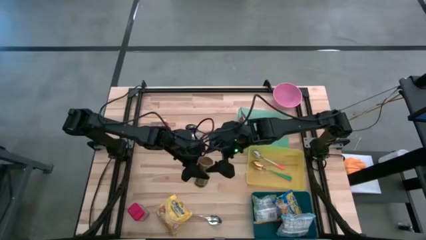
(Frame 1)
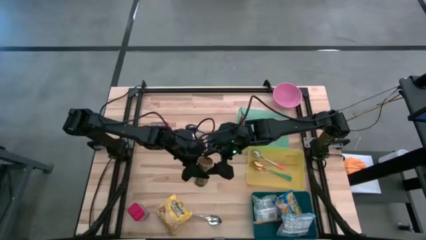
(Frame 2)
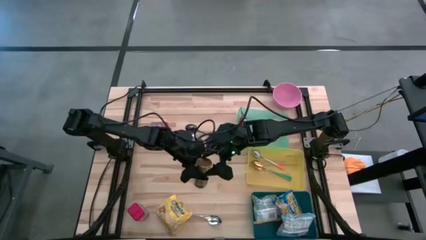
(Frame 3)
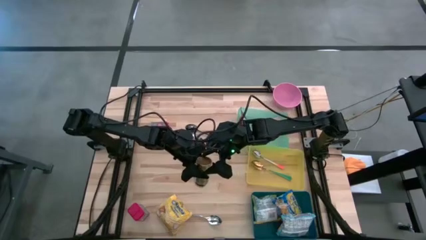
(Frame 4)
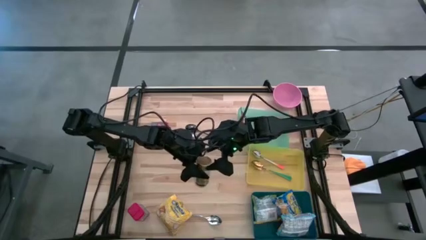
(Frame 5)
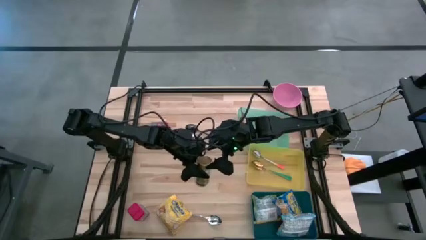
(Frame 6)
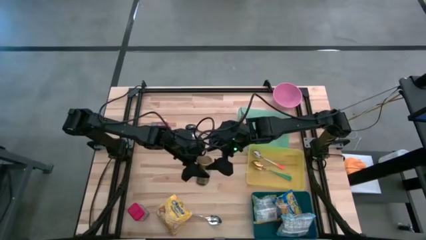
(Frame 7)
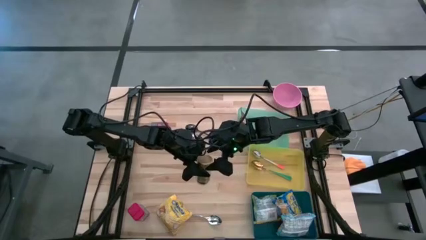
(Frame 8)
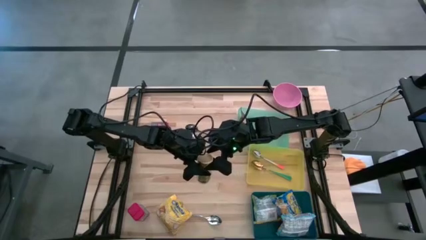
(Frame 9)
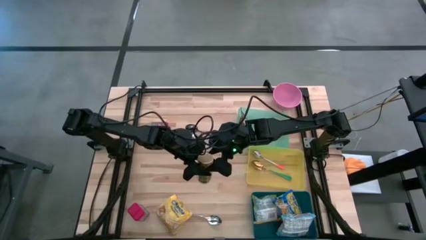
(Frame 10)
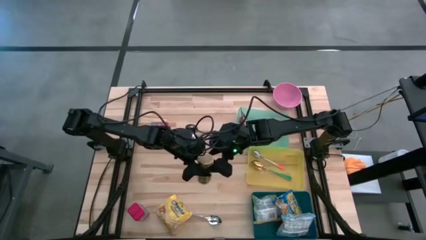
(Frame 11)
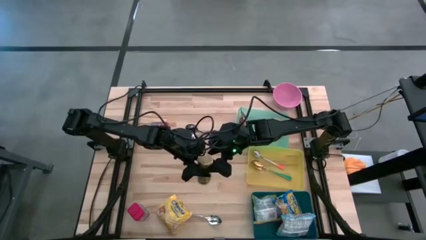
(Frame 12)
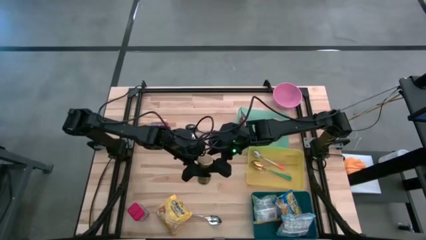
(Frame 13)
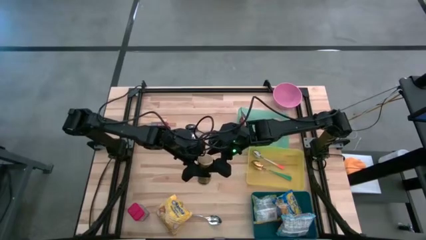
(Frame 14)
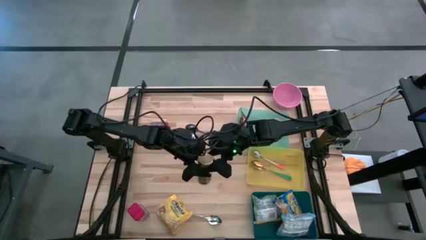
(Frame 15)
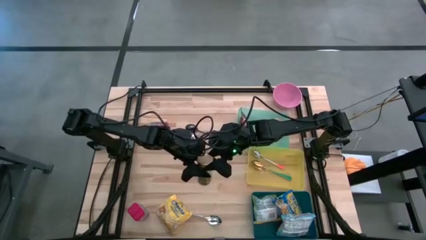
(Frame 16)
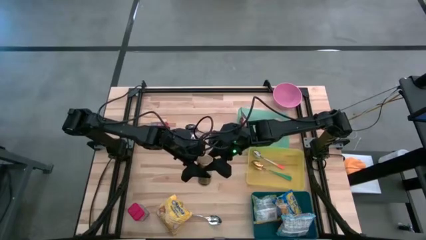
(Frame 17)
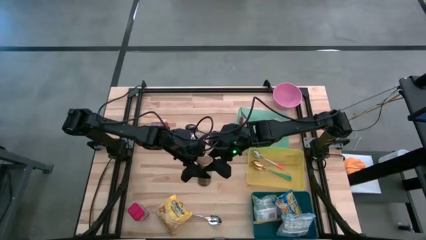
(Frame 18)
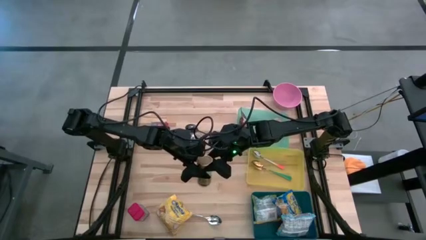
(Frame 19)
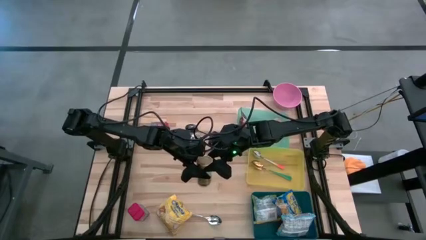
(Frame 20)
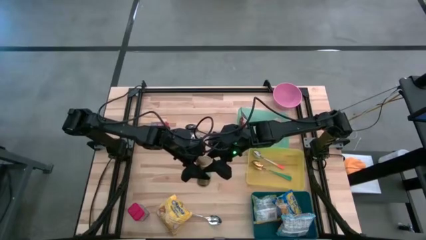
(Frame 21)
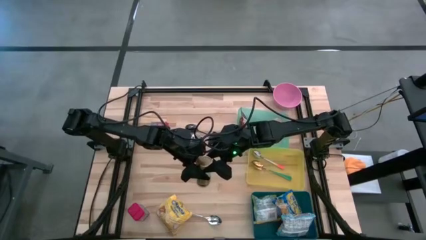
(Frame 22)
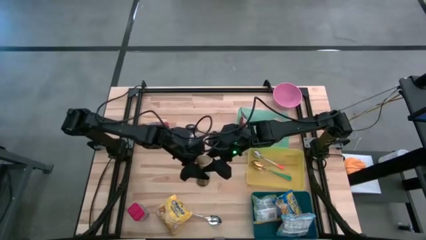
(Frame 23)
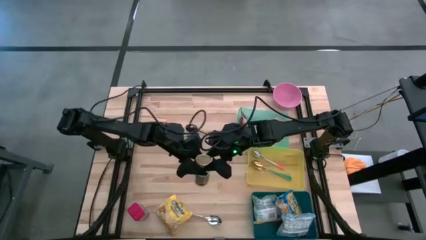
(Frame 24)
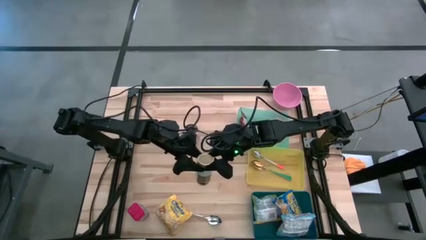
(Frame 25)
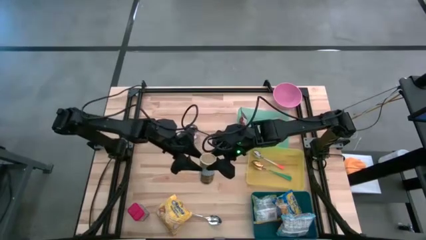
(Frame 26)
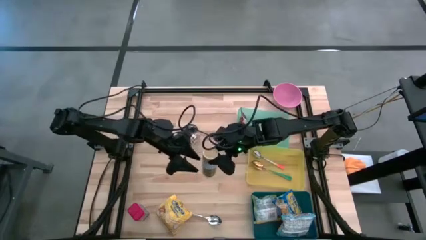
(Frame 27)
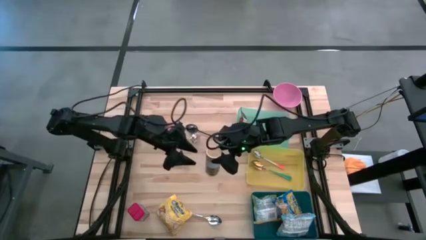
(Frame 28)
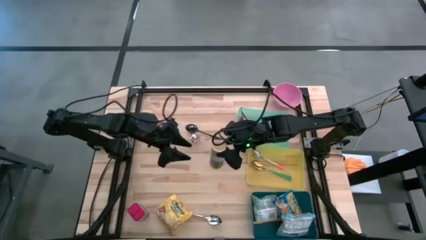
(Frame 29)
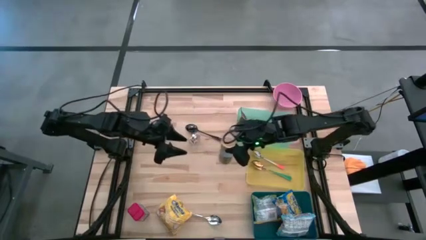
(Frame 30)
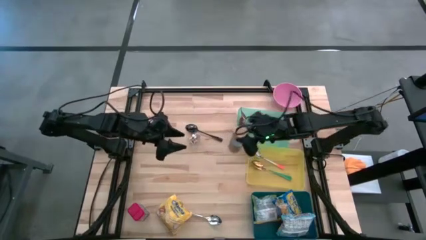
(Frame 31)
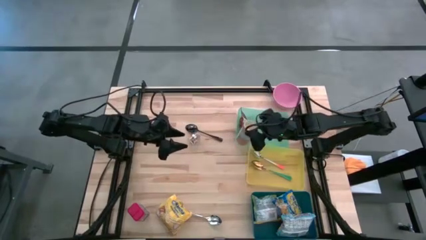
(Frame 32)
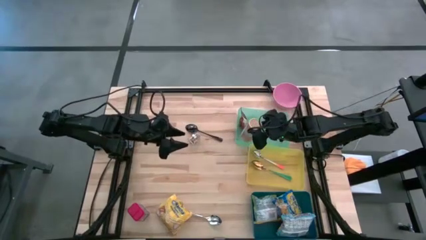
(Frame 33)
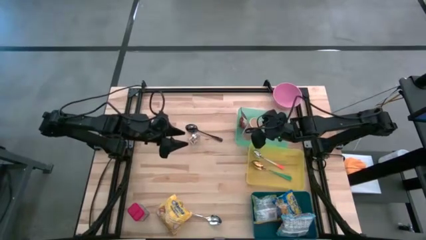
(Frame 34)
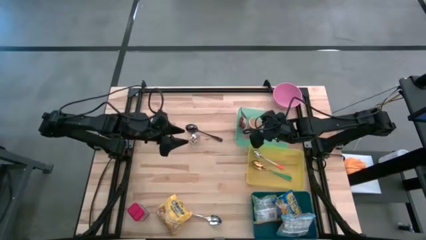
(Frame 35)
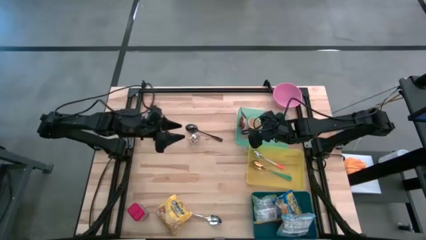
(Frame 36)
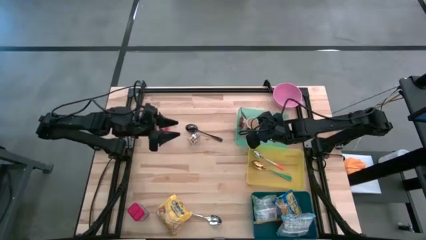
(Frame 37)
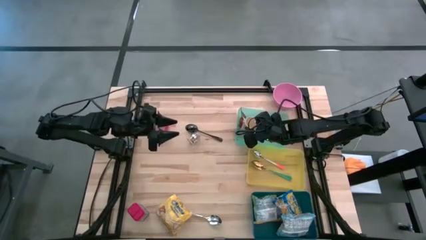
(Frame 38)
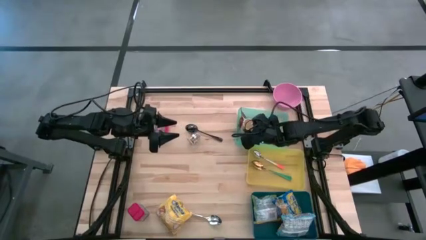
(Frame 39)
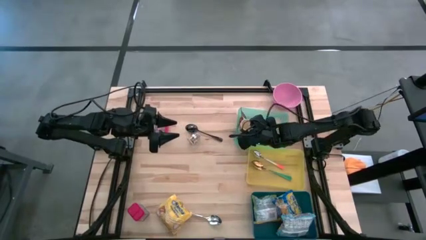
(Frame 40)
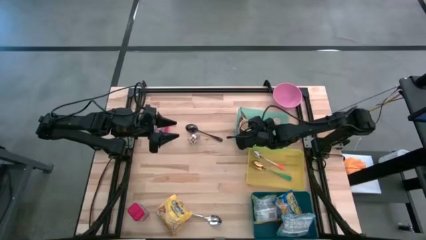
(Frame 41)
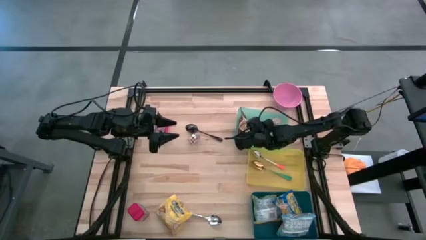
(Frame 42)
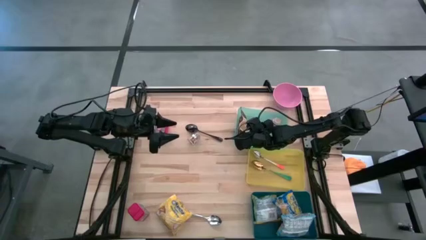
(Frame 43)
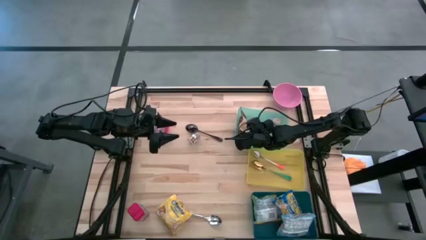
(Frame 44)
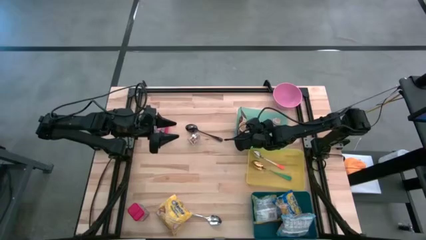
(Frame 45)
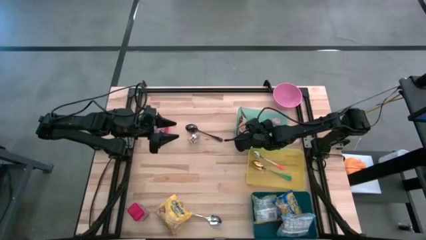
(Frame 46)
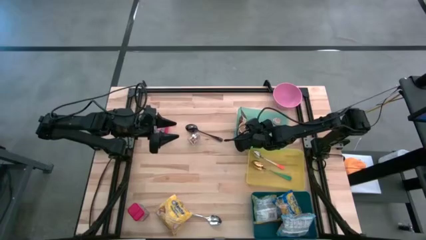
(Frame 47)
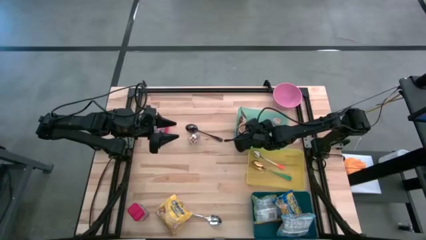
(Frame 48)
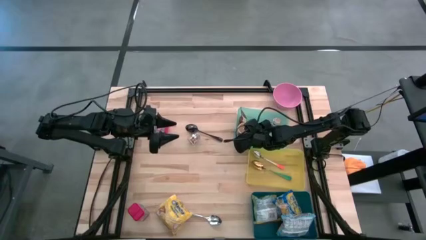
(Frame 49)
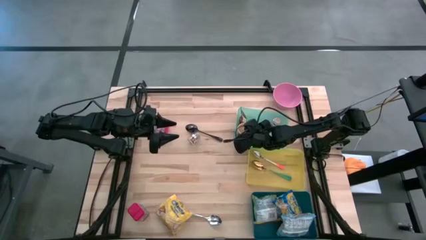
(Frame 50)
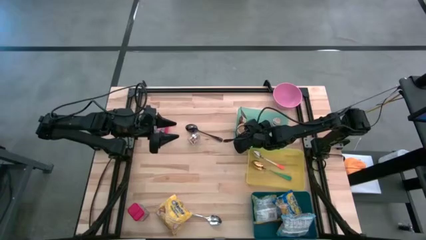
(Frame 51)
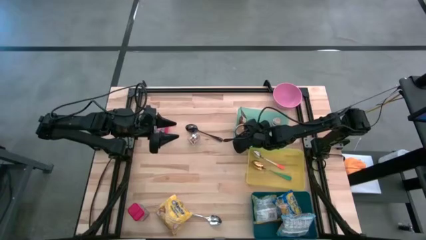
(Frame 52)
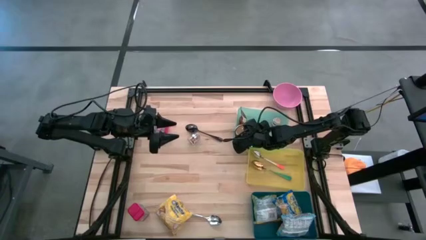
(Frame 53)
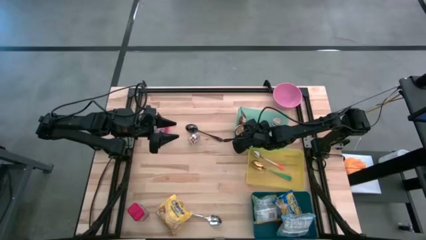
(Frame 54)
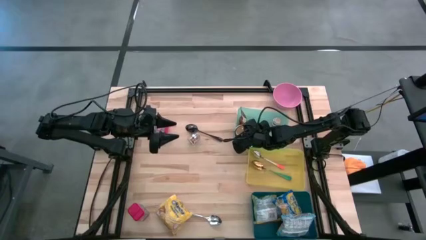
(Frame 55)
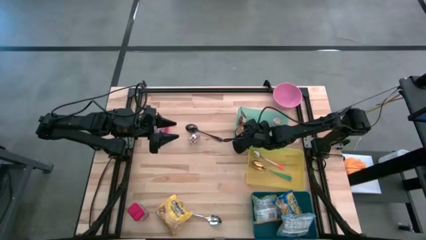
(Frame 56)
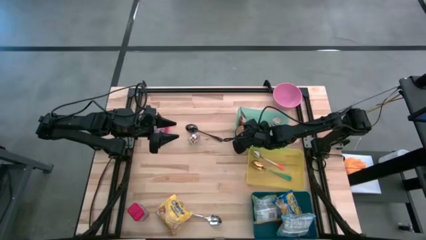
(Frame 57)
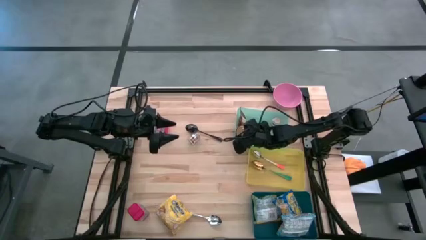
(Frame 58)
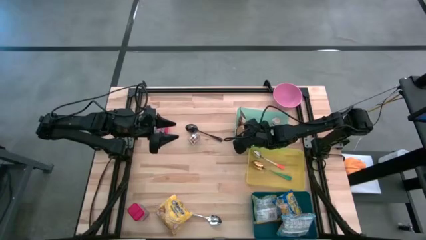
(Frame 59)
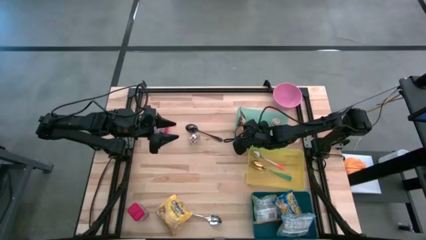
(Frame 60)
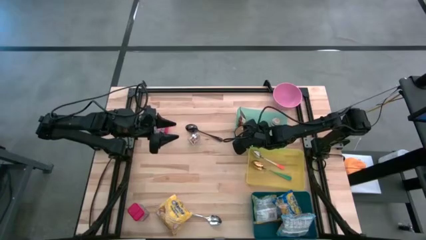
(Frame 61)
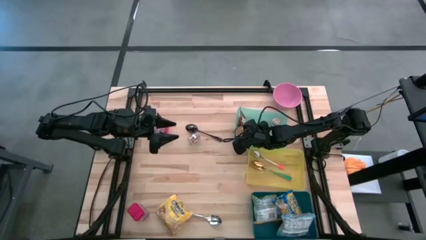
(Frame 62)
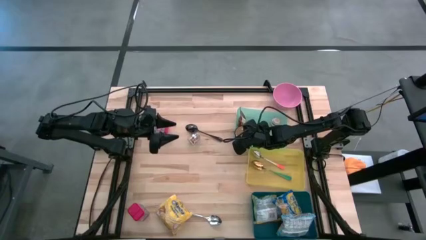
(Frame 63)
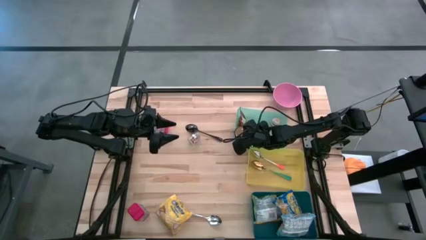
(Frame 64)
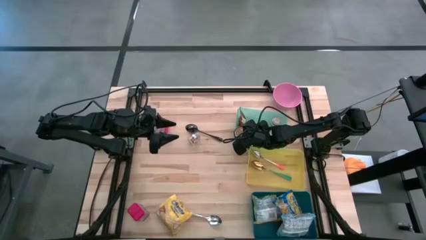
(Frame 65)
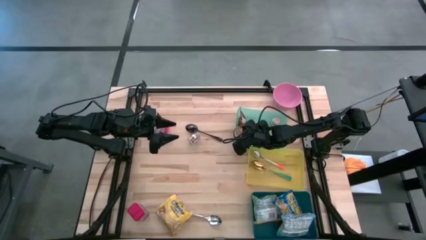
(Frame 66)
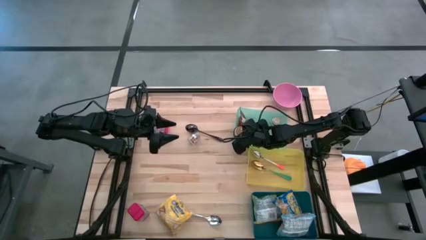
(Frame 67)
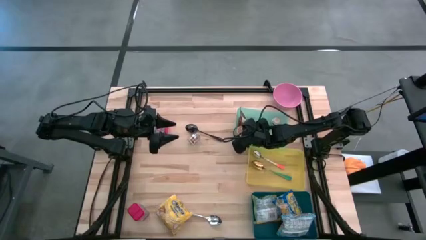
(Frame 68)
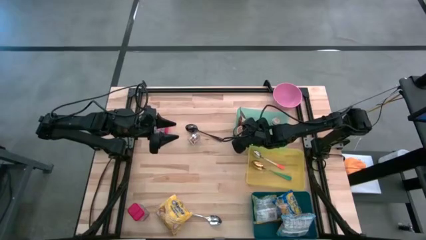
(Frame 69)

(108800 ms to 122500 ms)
Put the golden seasoning bottle into the green bin
